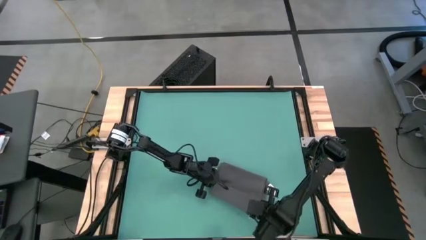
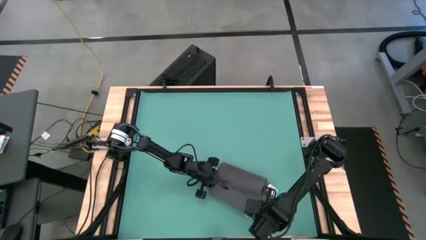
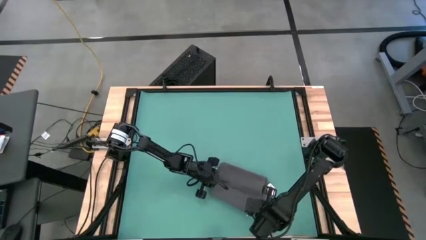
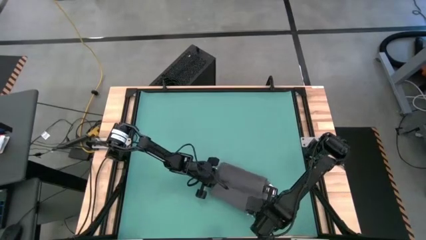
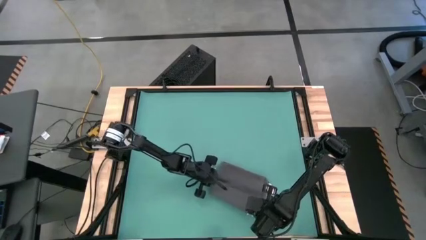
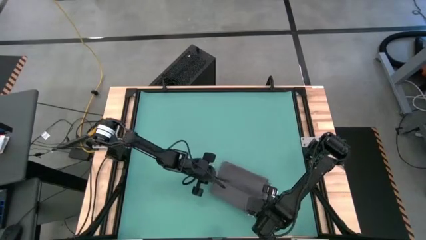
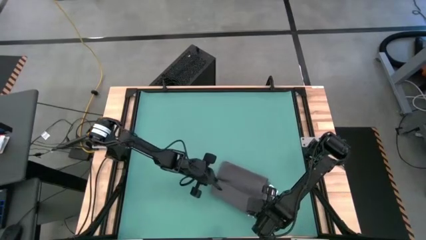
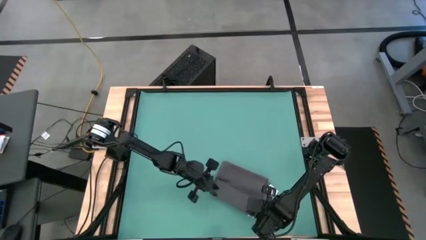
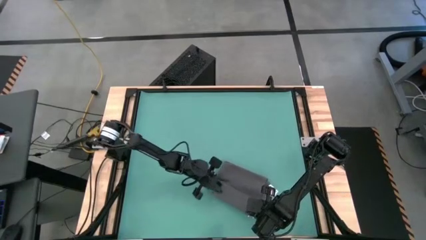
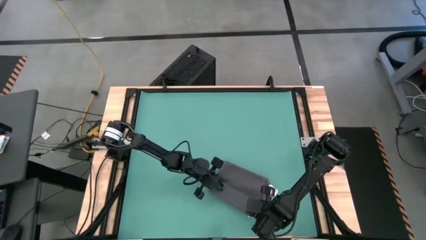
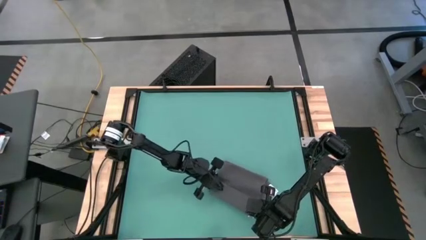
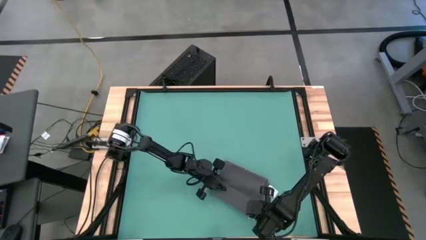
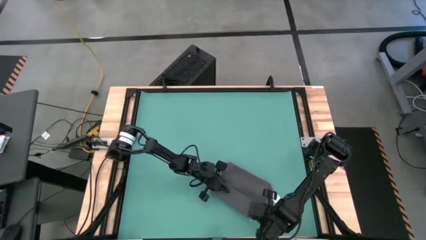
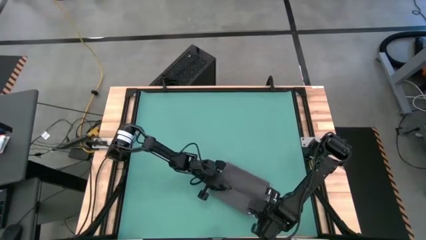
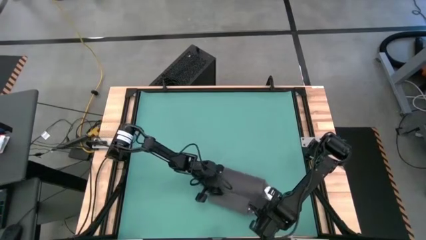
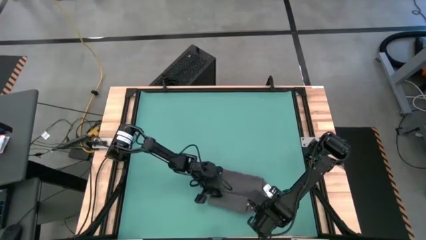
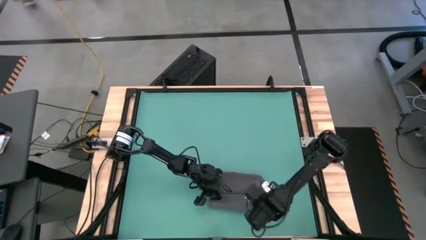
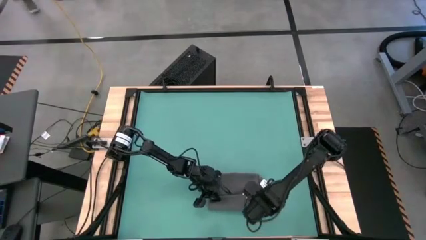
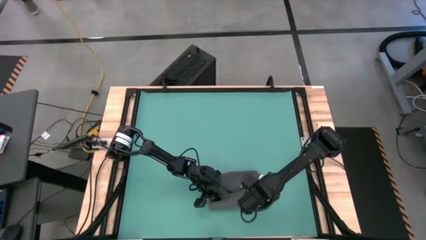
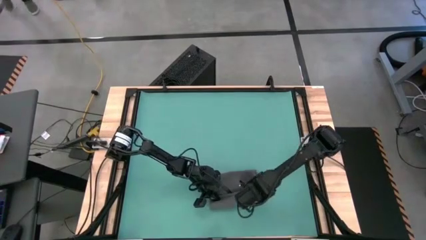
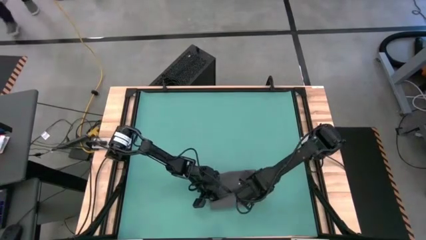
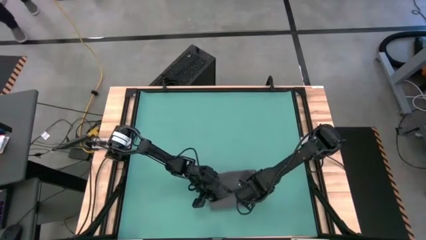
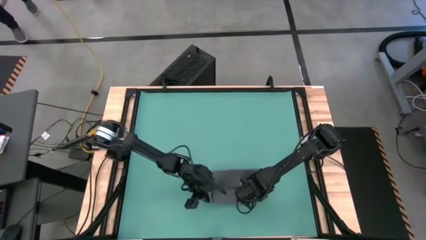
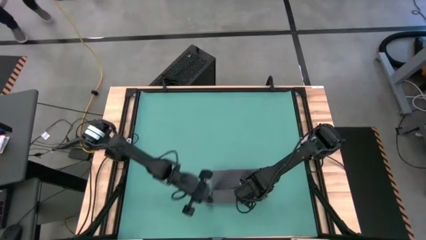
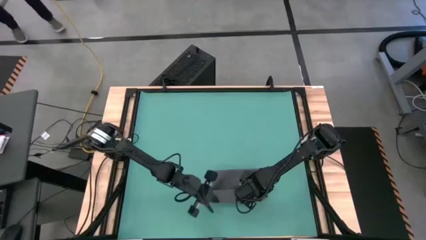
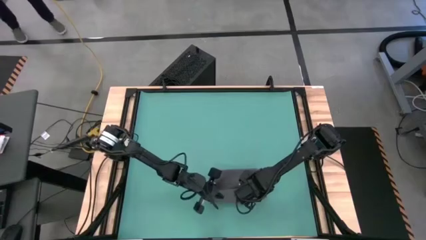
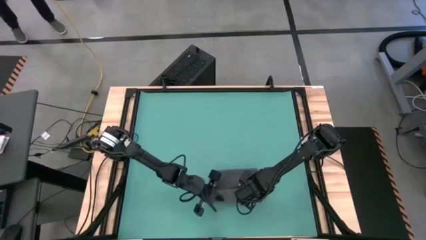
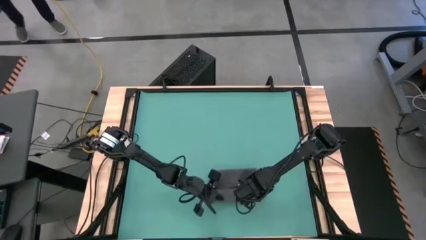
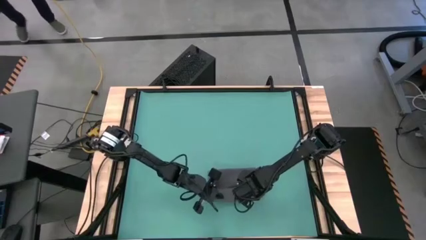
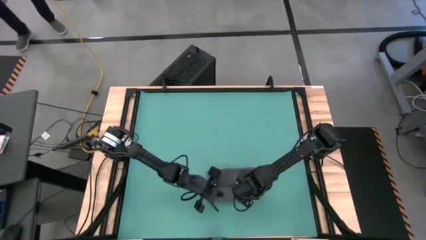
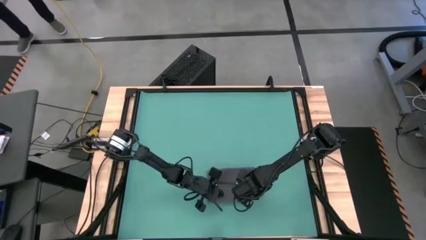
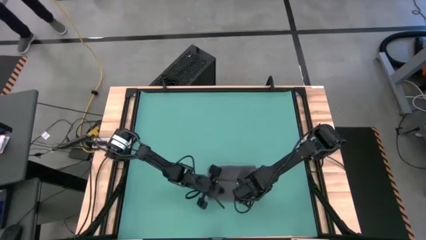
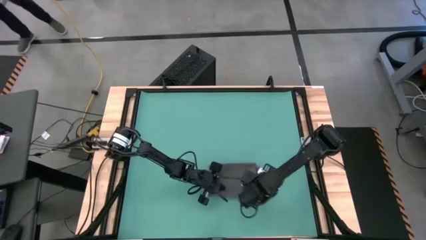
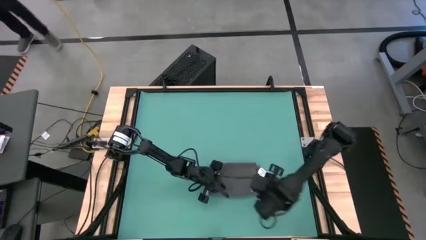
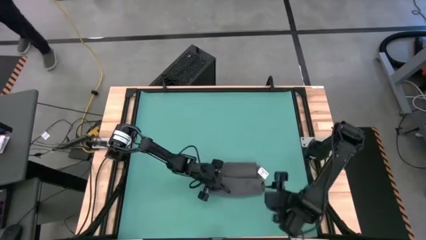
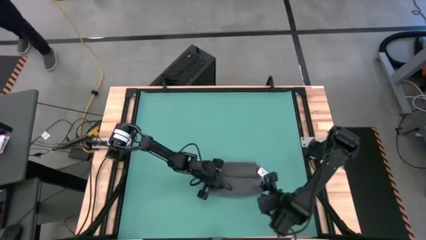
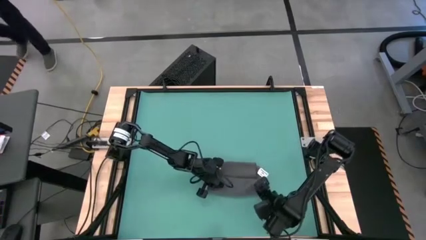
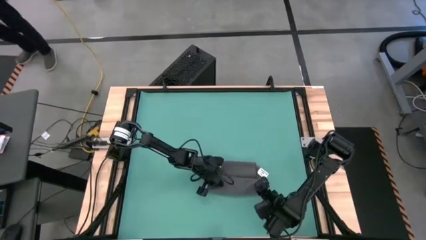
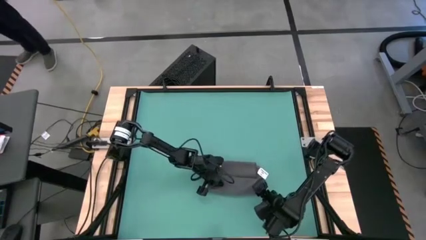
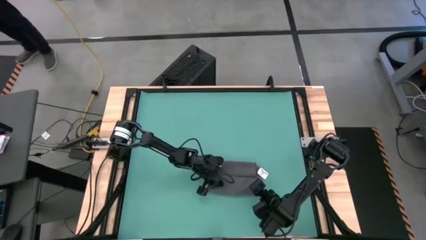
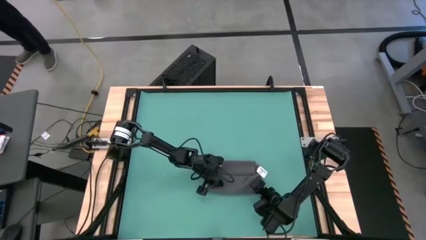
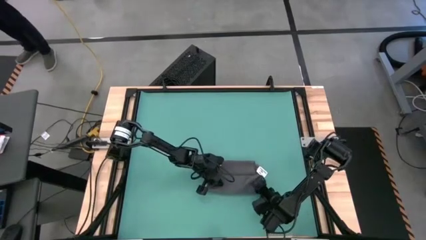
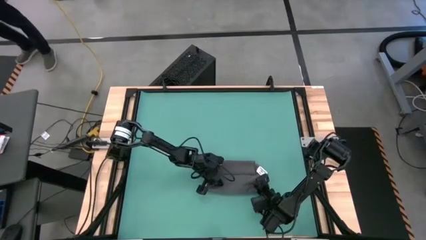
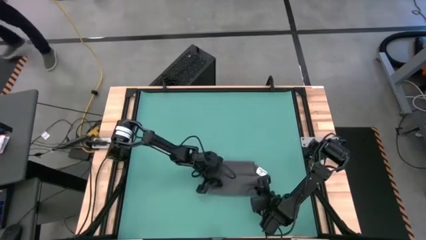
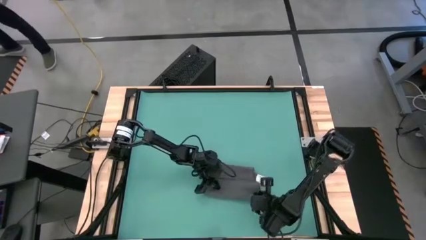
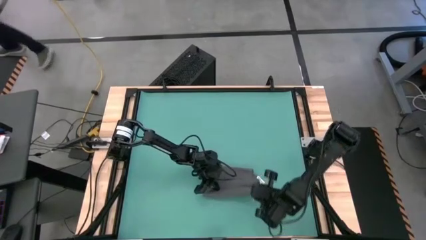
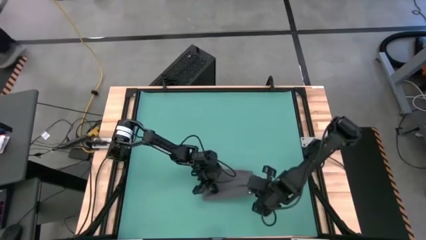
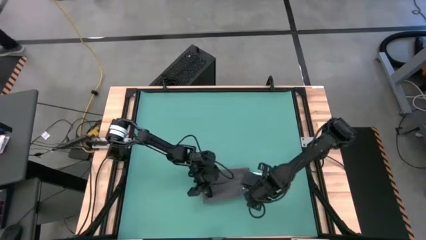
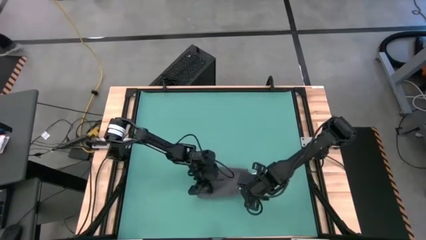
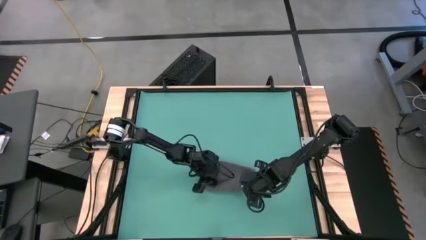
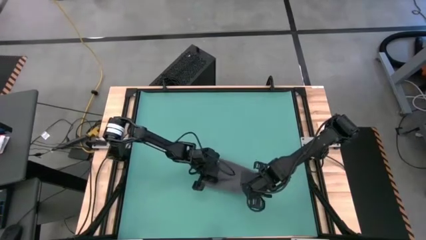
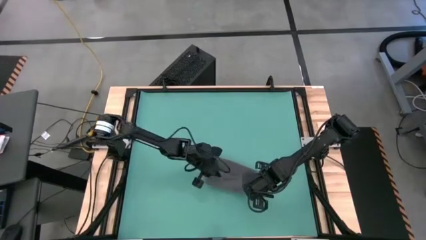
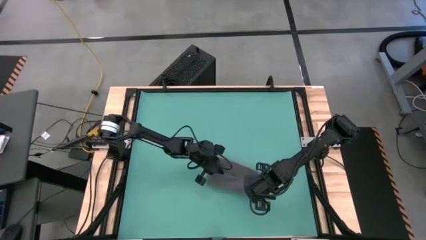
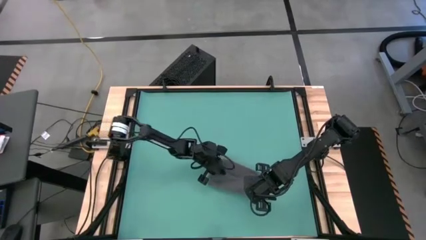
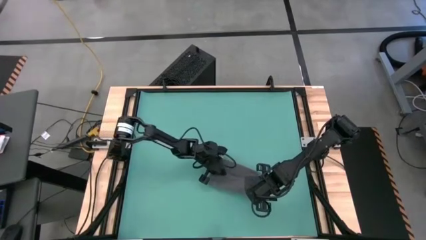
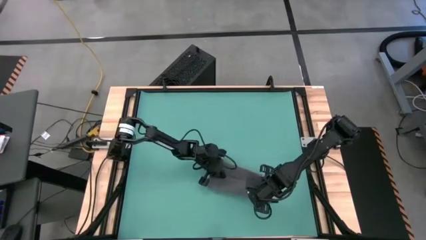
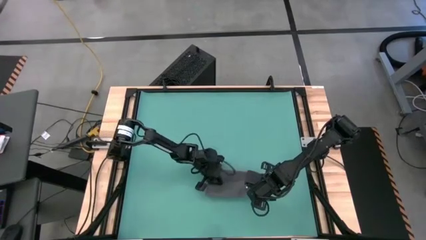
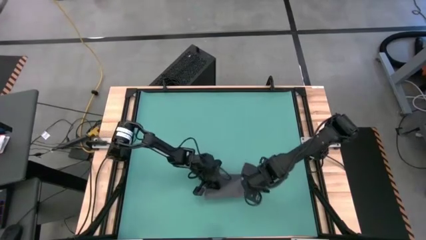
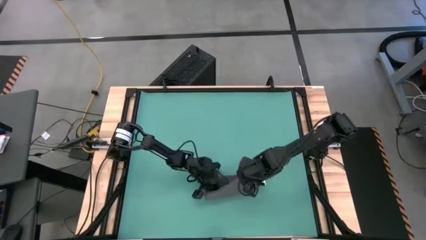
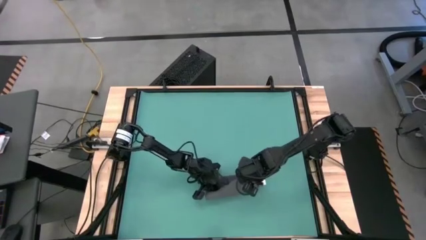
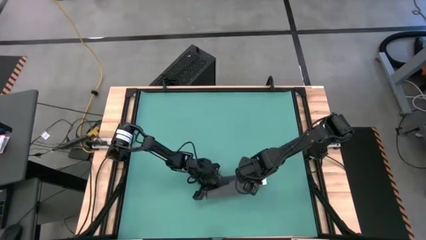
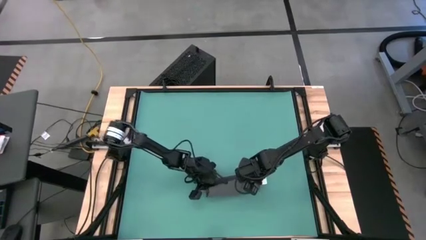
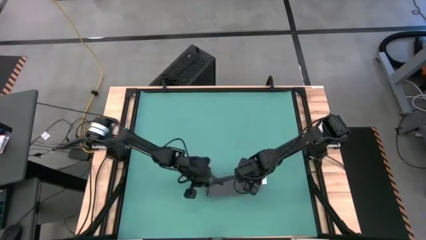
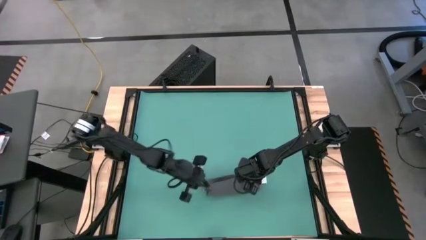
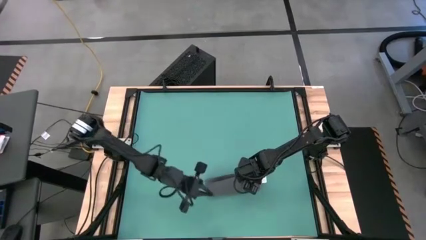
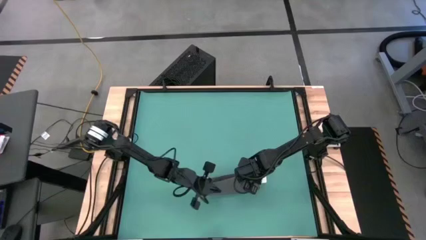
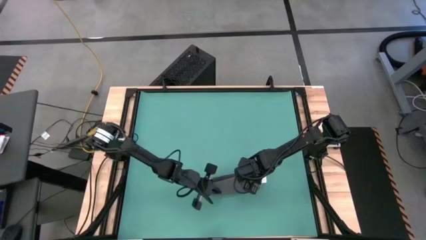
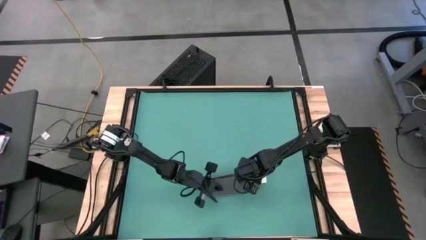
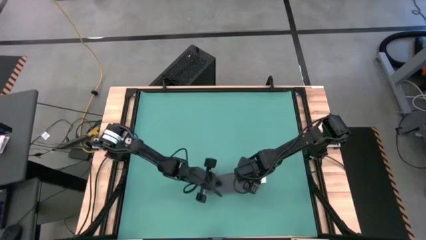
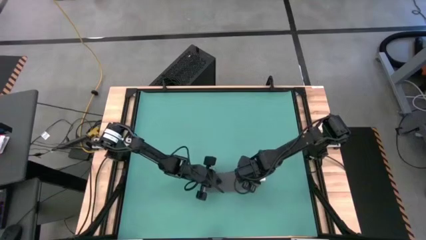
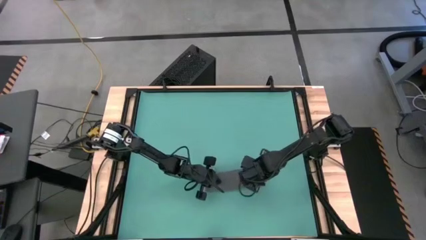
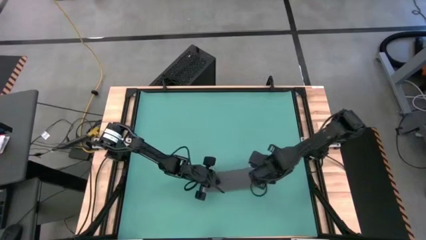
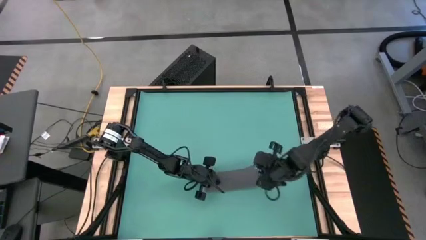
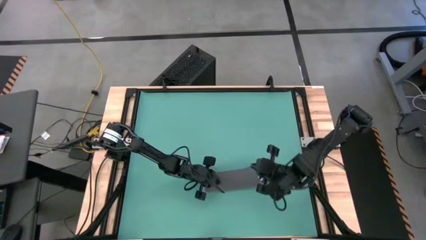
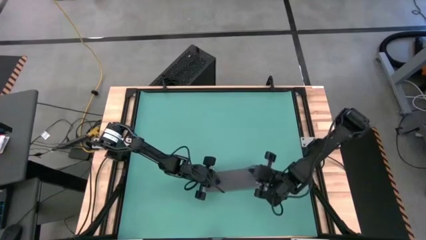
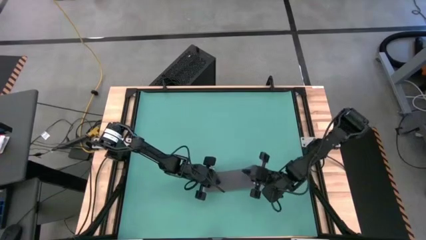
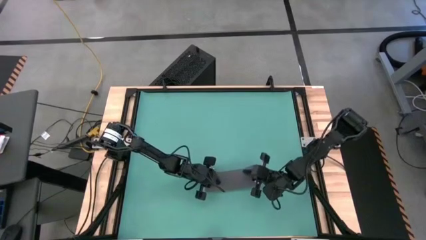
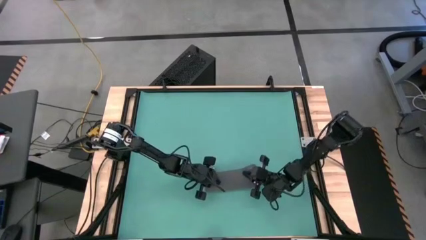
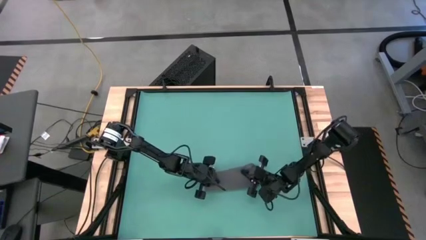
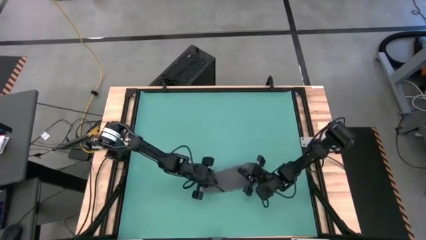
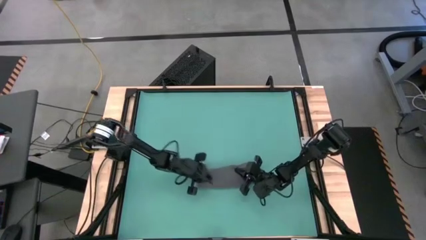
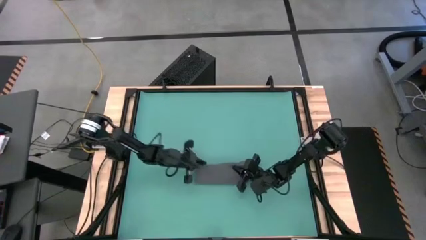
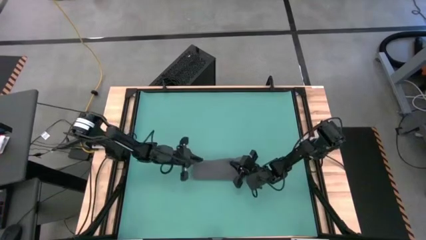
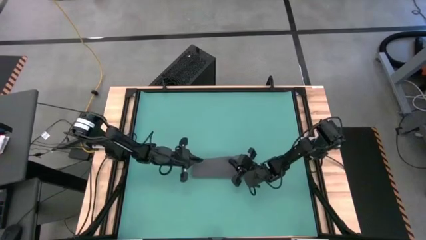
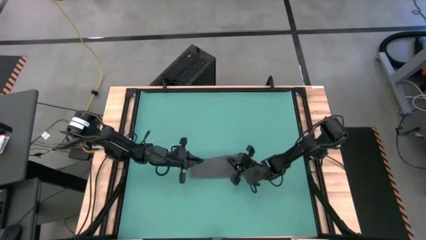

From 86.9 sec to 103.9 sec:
Task: Roll towel into tight, uniform cylinder
Roll the gray towel
